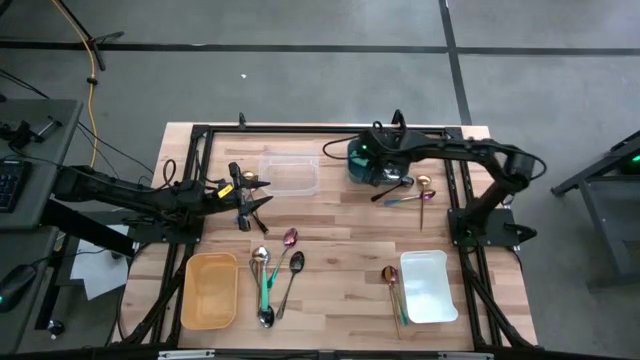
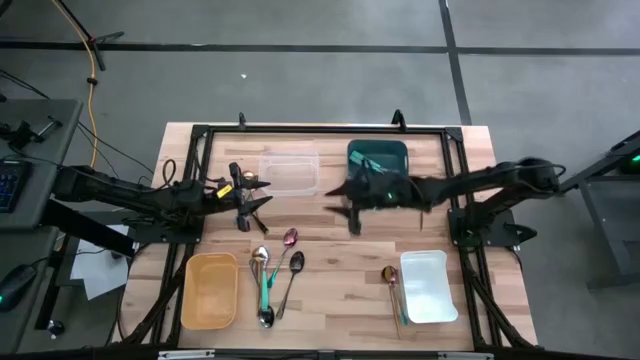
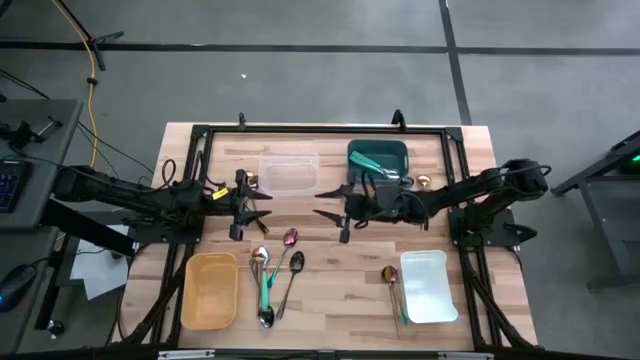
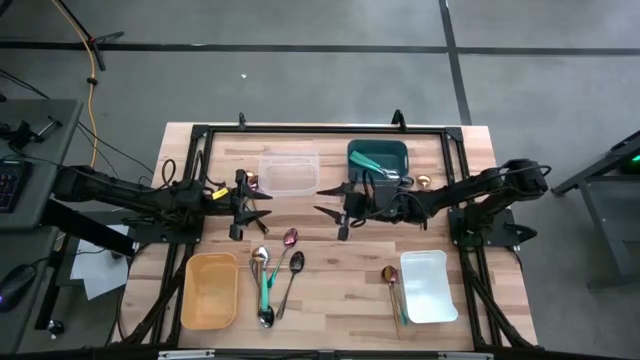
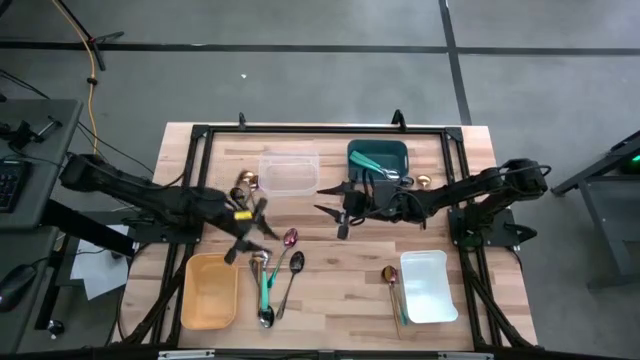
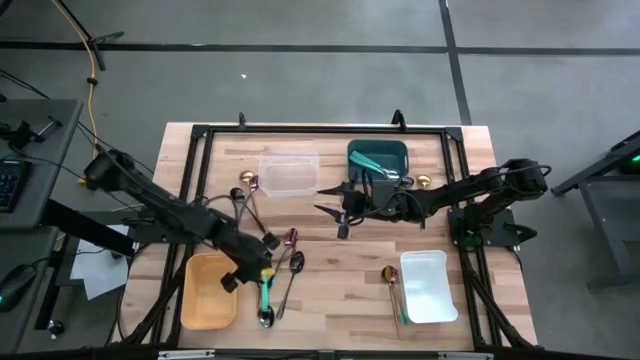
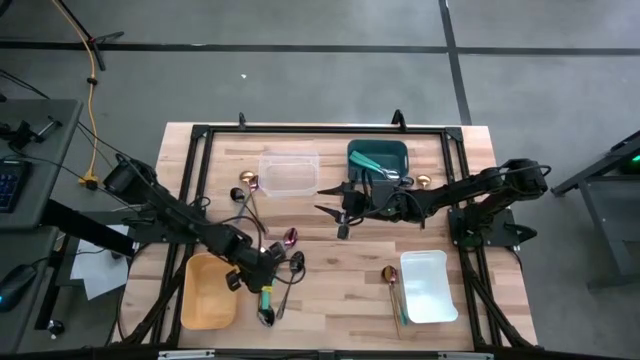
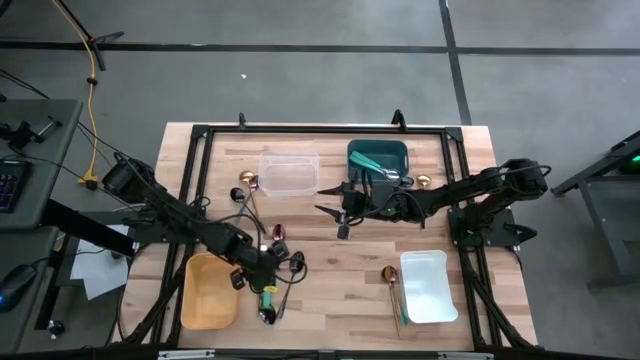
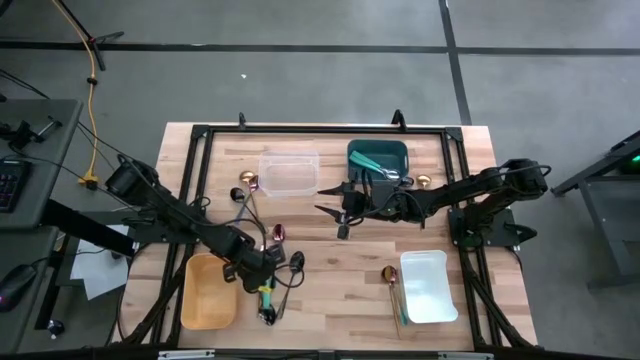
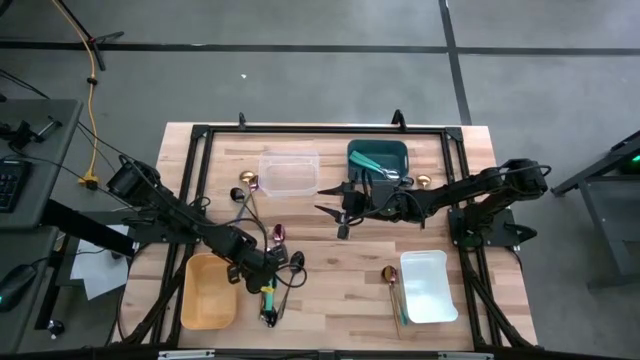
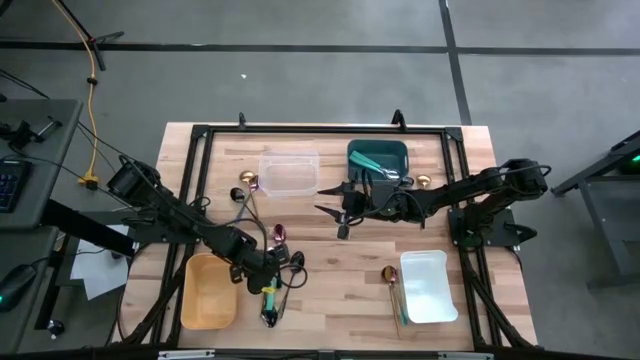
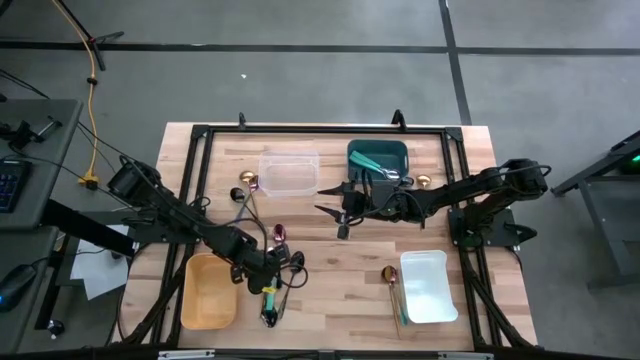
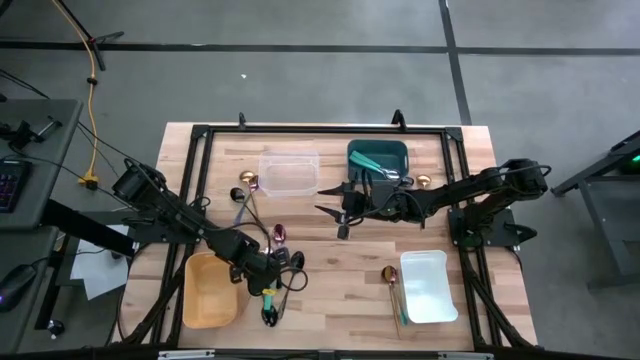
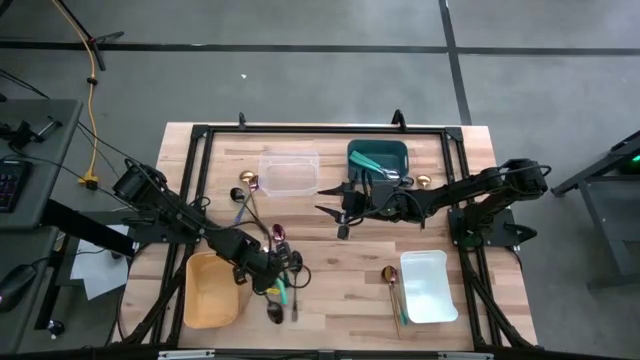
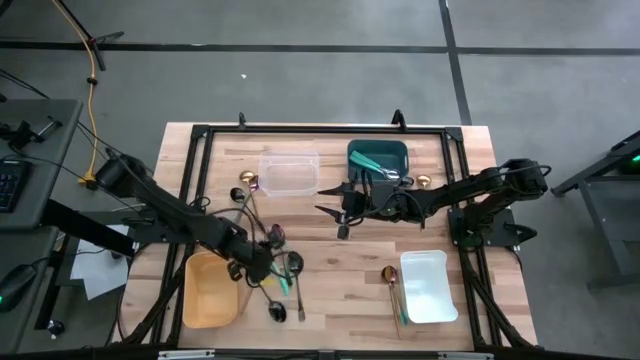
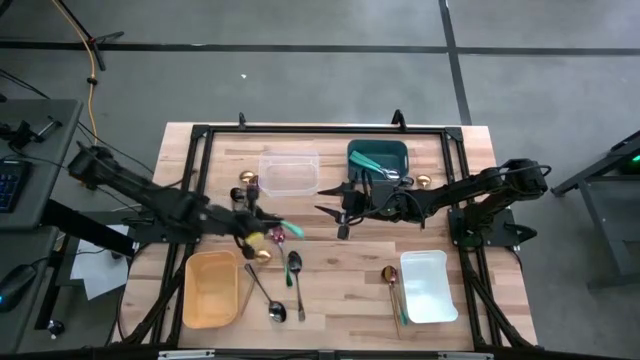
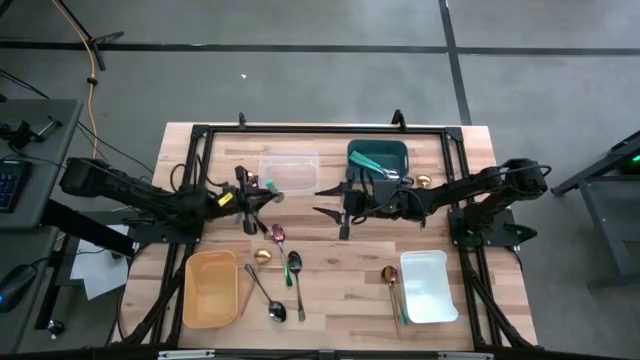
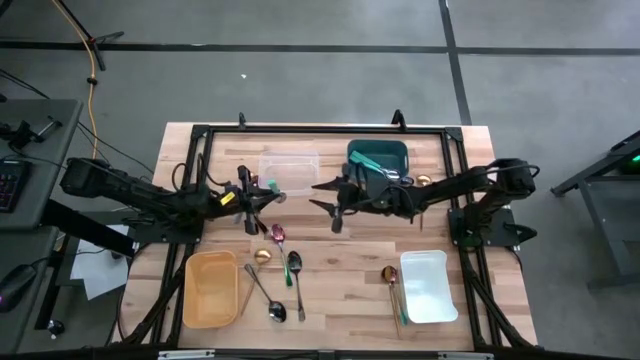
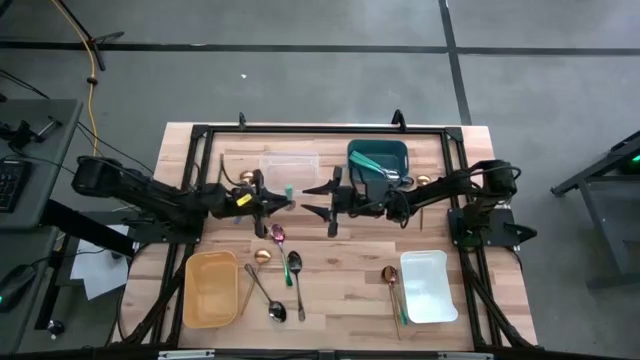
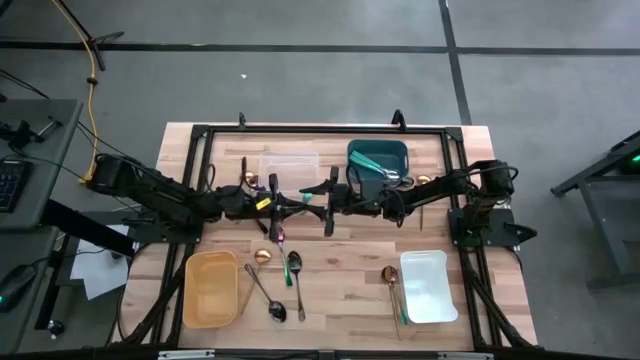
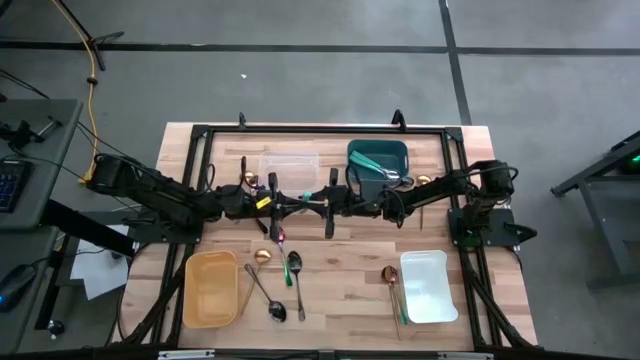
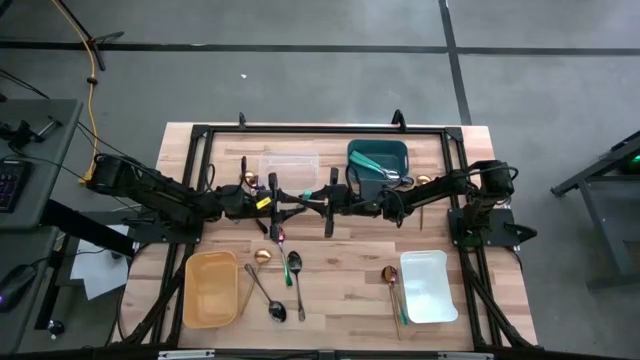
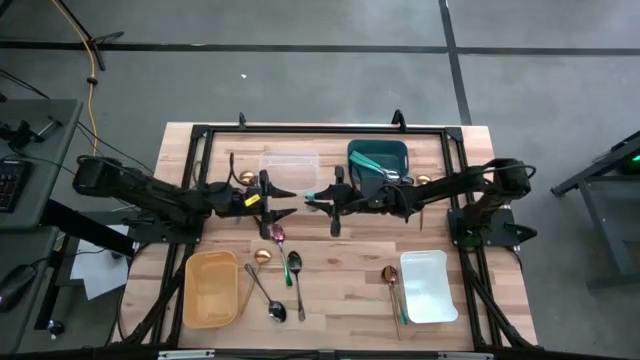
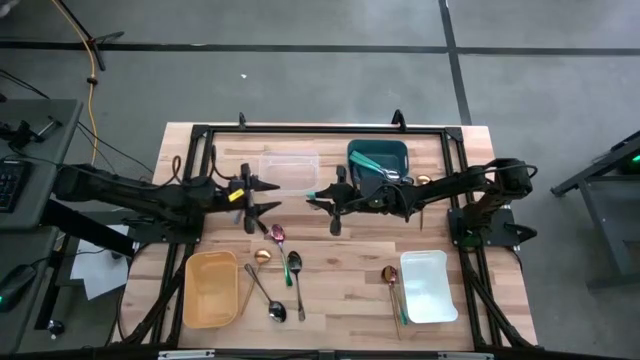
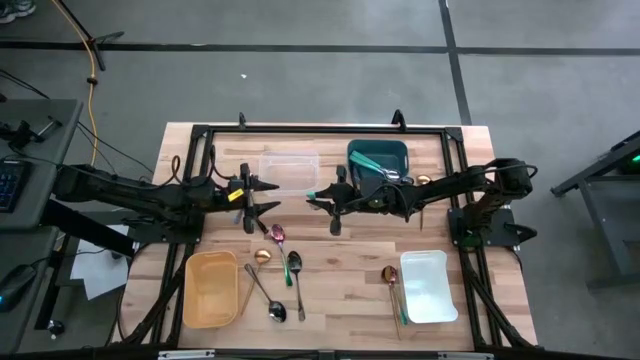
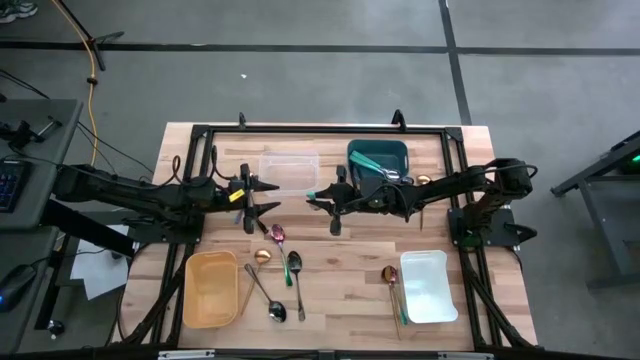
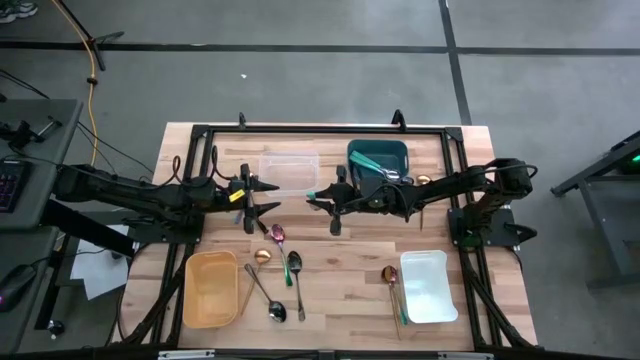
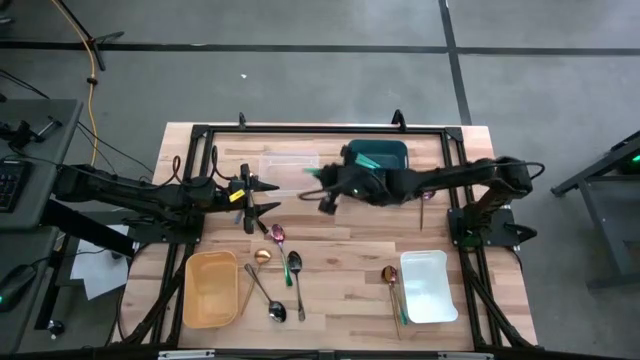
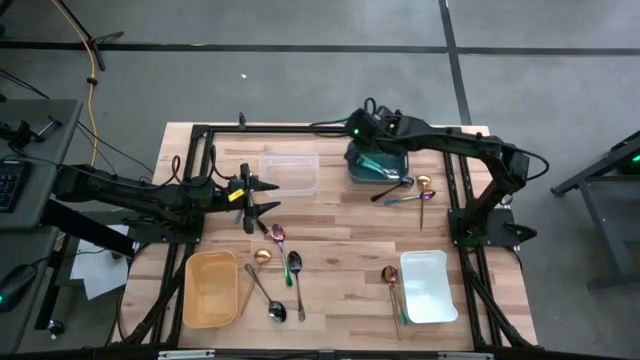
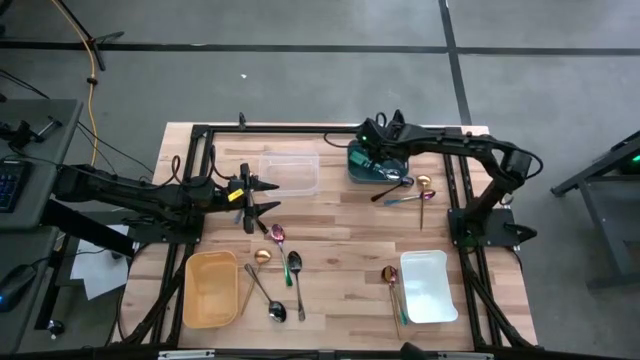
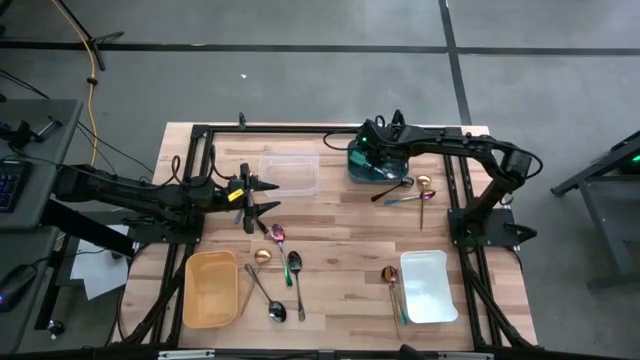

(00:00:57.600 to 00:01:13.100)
Task: Sort silverware by color (type)
Put the green spoon into the blue bin

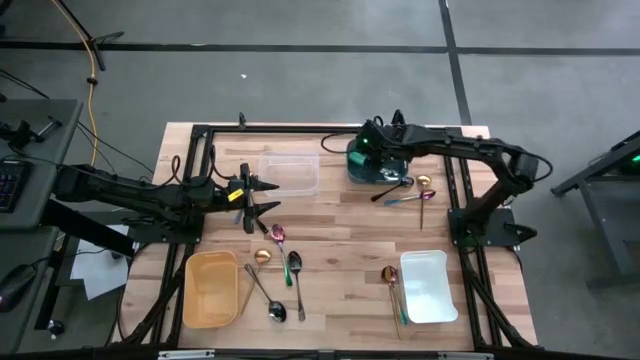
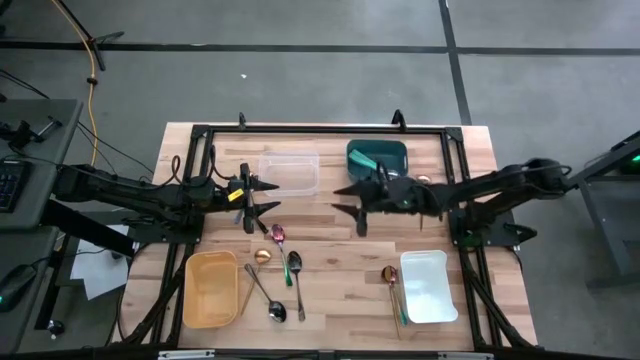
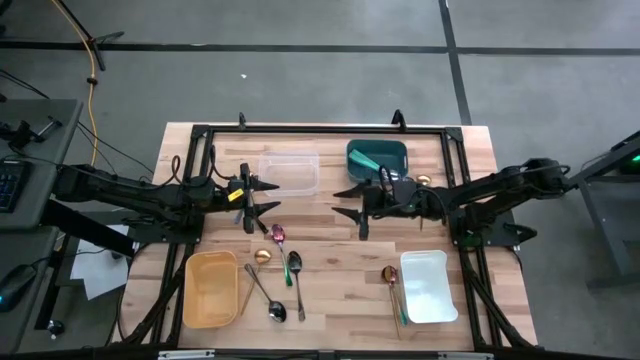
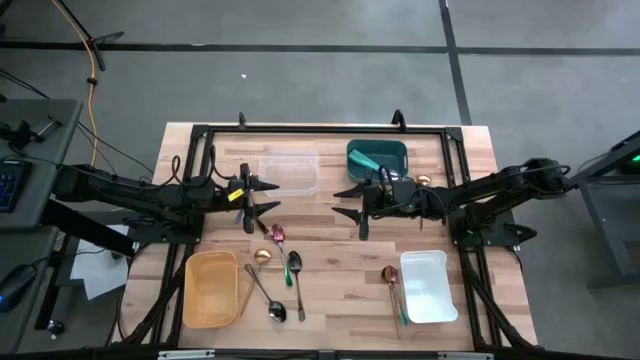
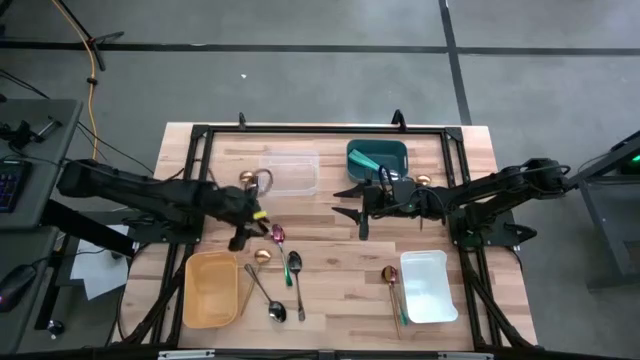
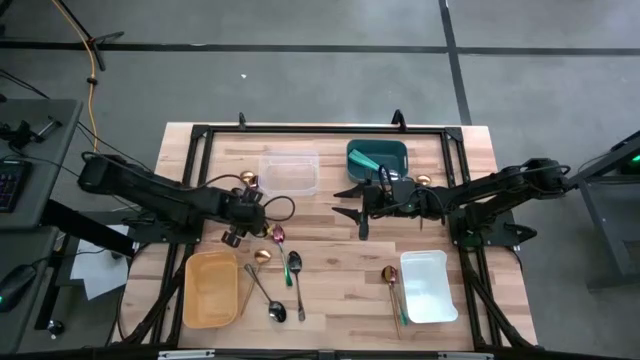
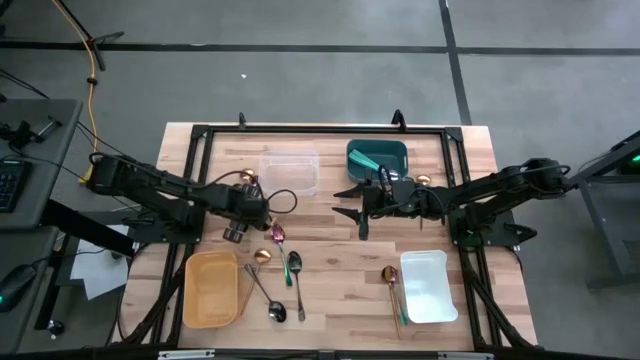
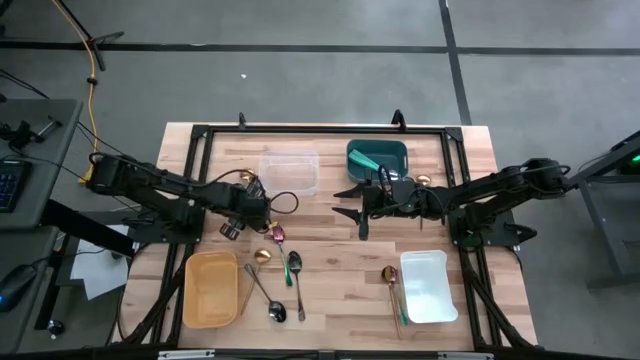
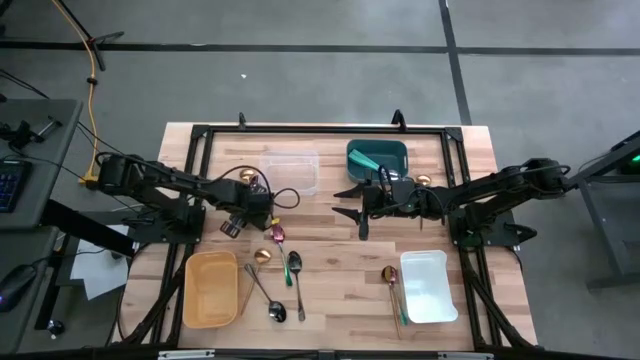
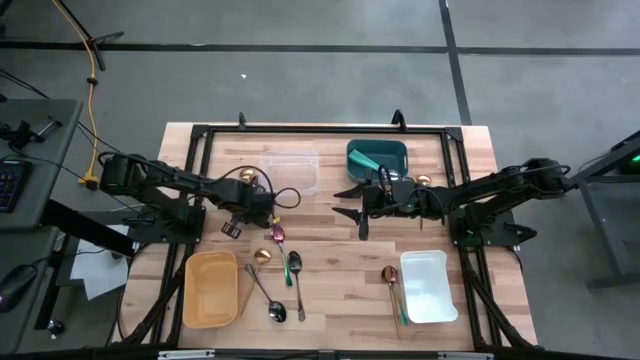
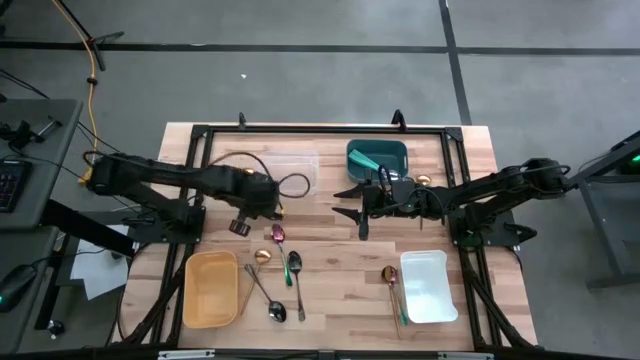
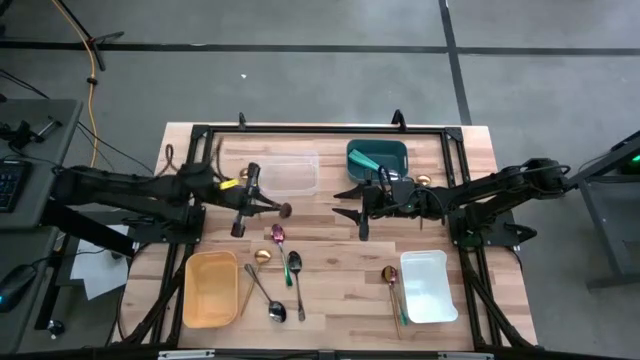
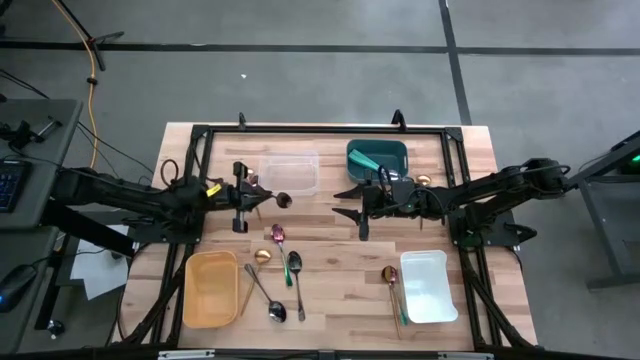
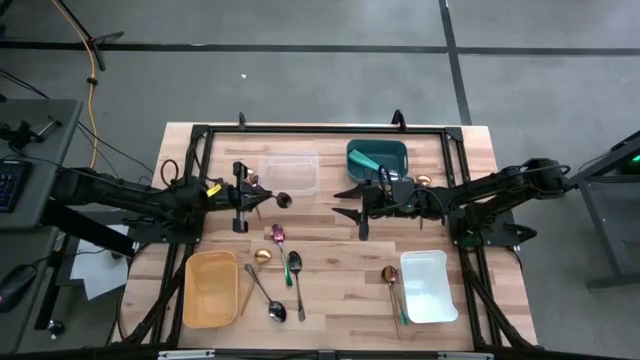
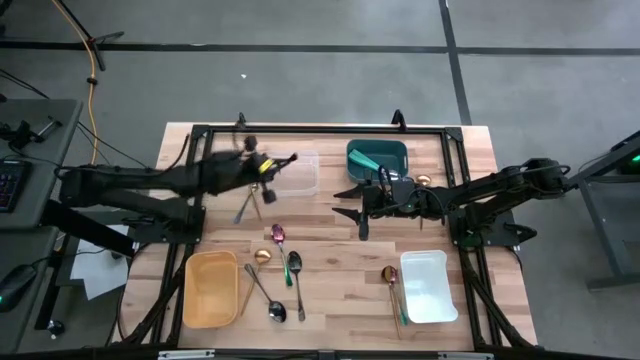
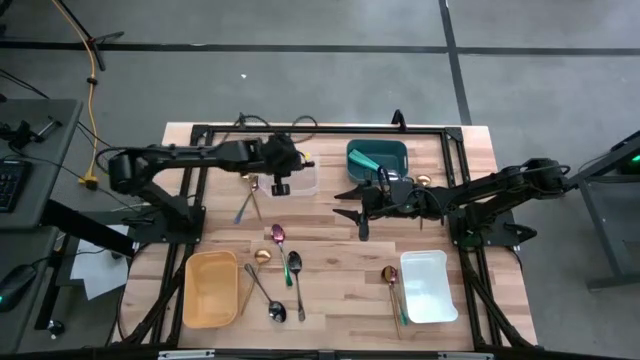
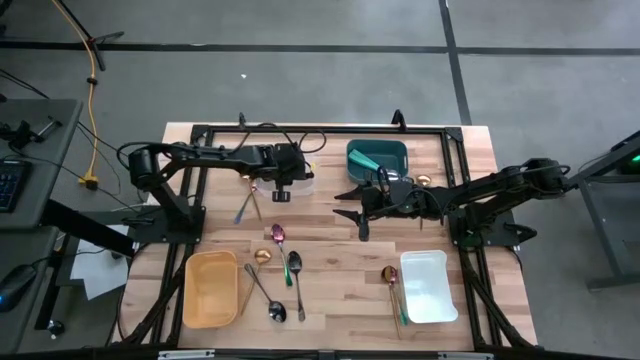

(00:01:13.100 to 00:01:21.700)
Put the black spoon into the transparent bin
